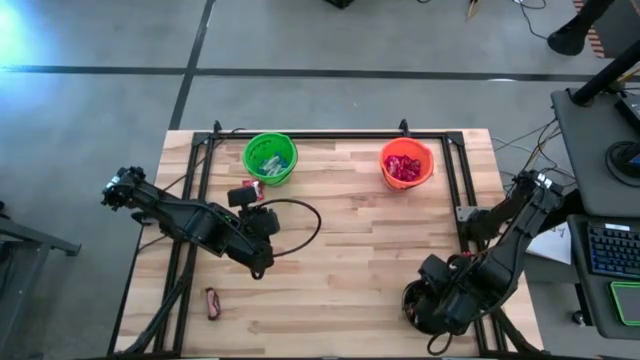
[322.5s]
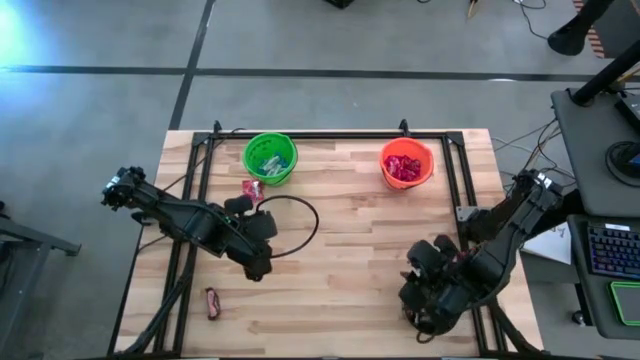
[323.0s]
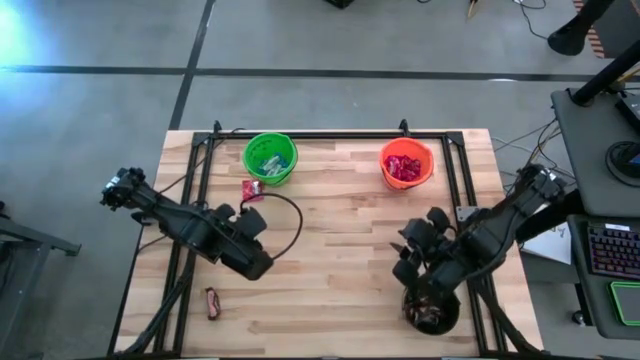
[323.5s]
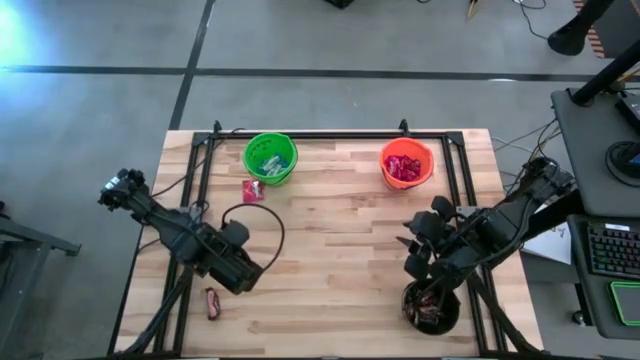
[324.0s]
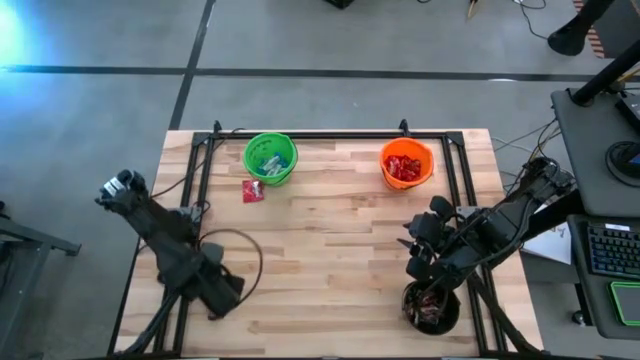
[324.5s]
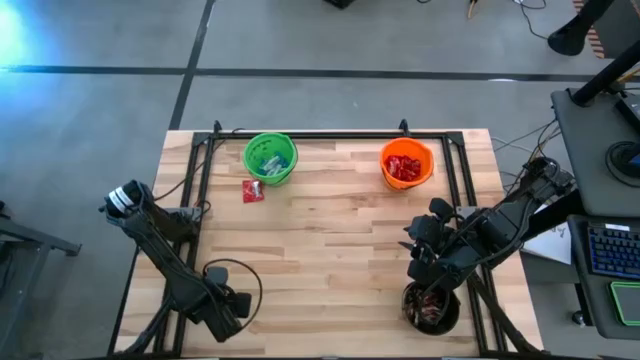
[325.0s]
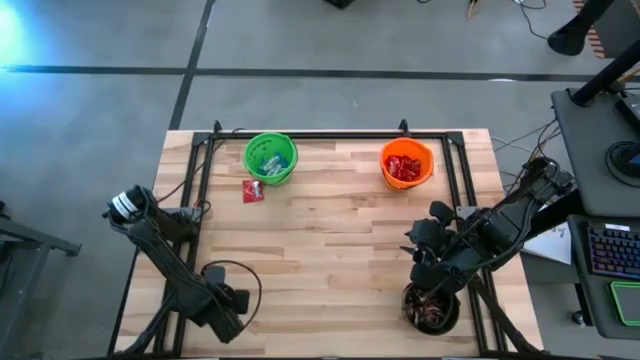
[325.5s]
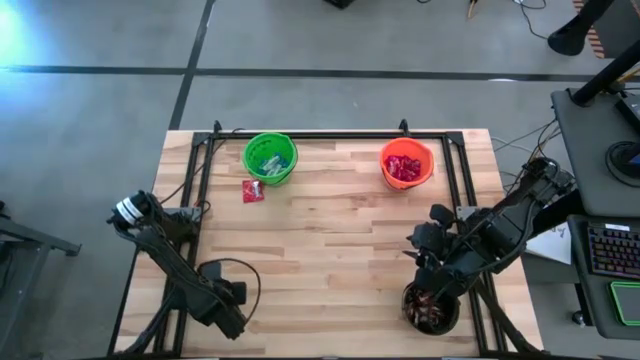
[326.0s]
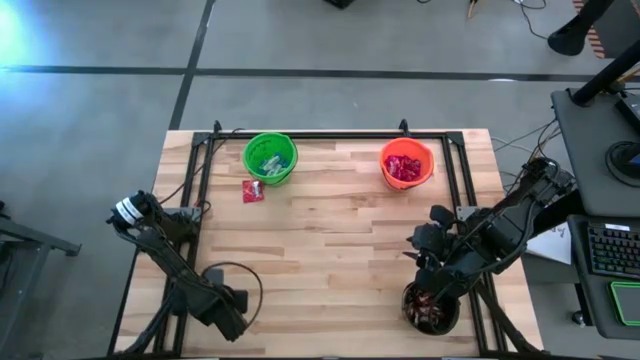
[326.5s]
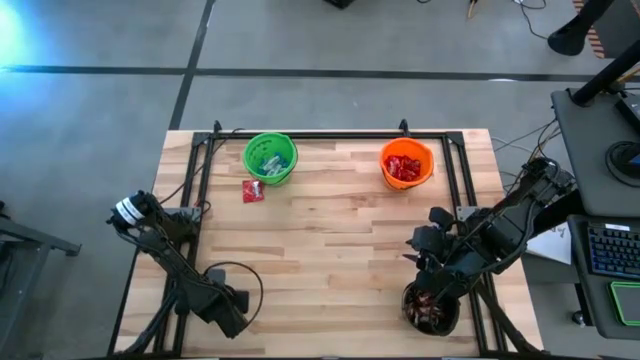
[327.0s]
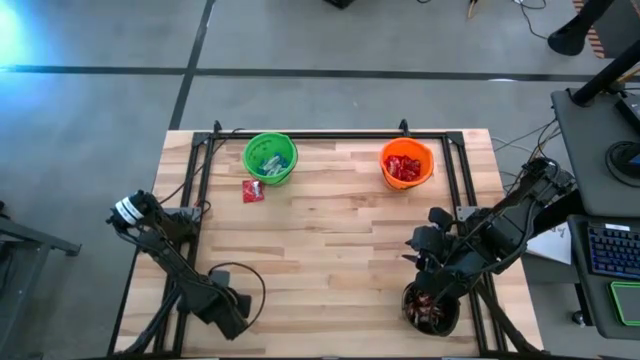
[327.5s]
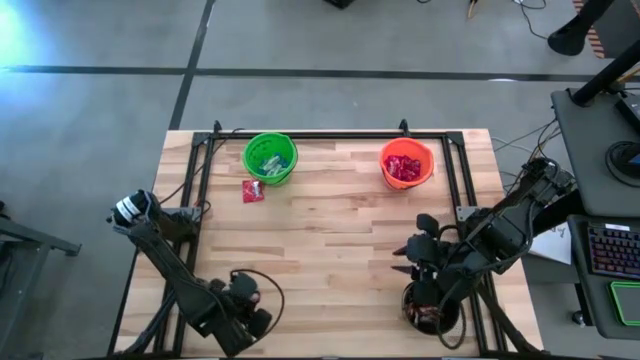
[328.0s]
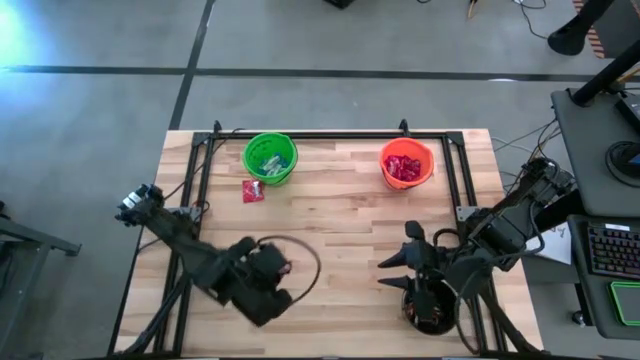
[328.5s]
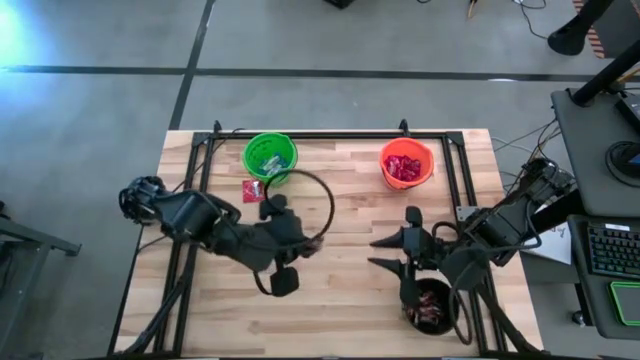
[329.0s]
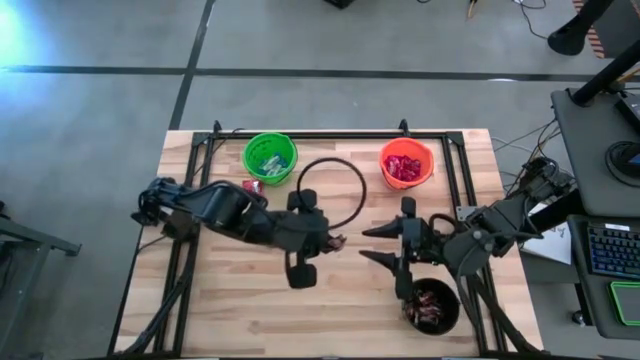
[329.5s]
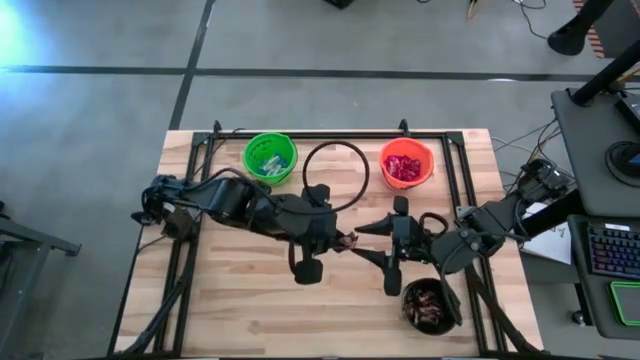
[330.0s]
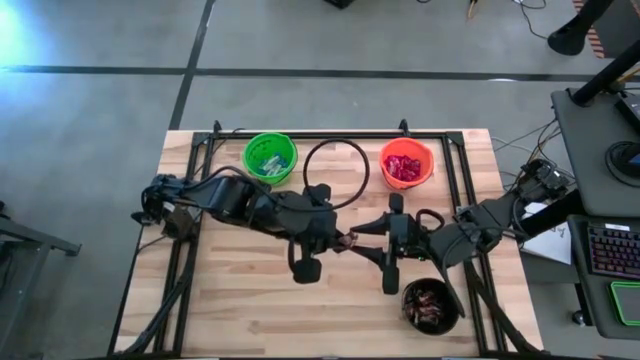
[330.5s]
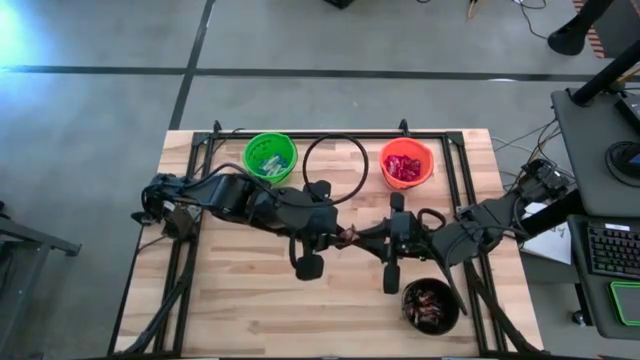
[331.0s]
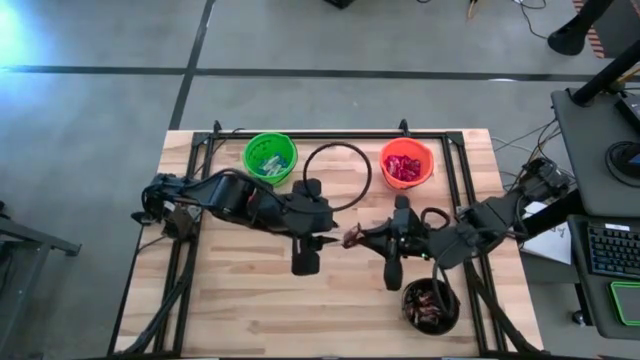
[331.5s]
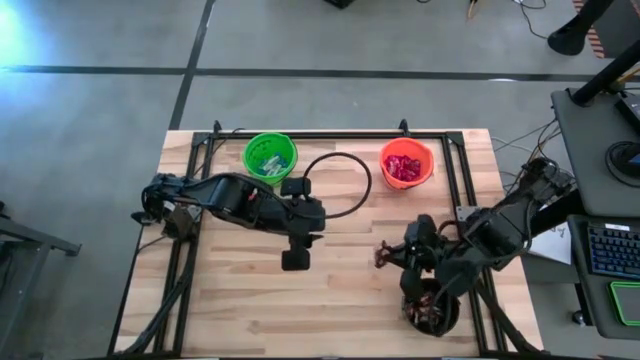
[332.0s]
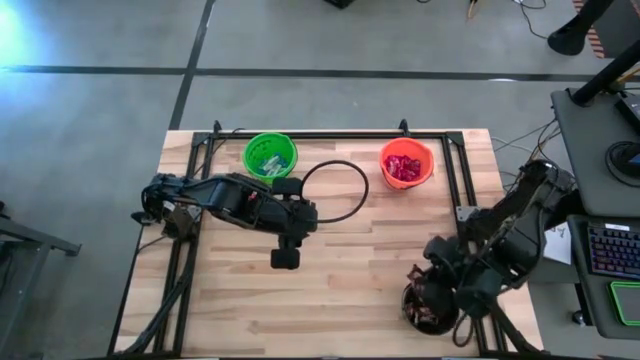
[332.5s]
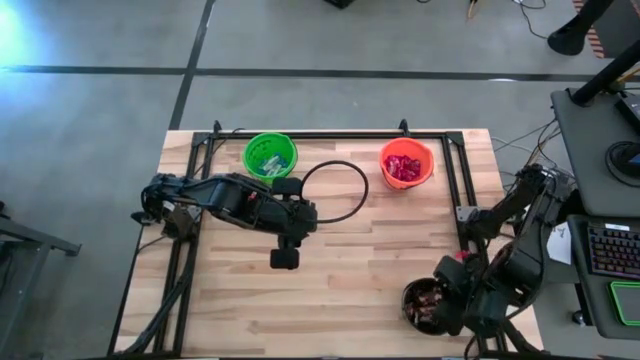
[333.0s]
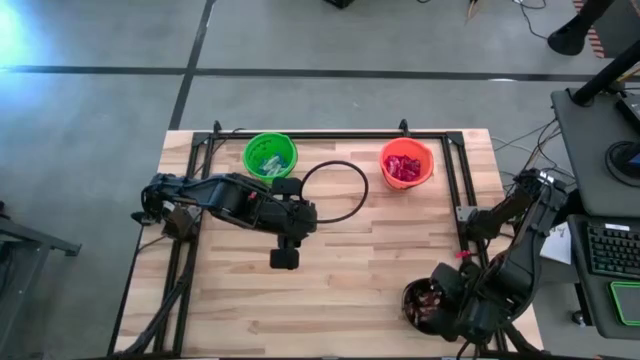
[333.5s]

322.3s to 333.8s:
Task: Sort candy
Put the brown candy into the black bucket

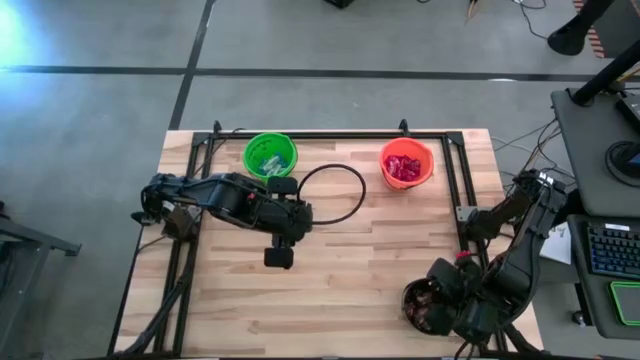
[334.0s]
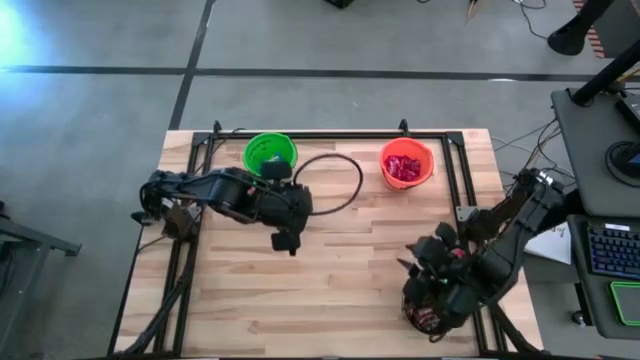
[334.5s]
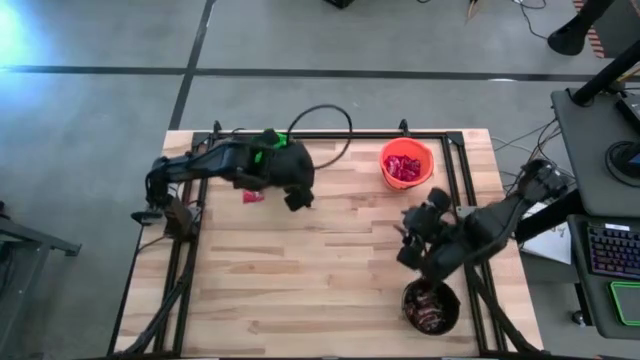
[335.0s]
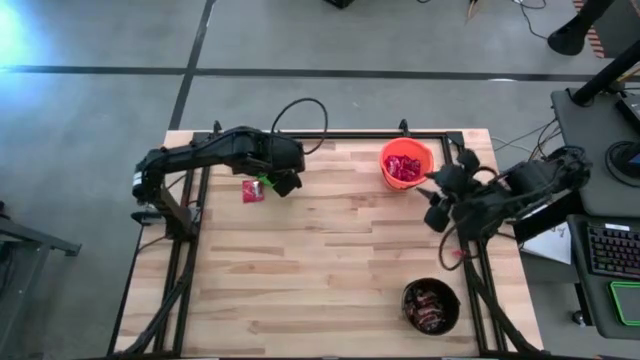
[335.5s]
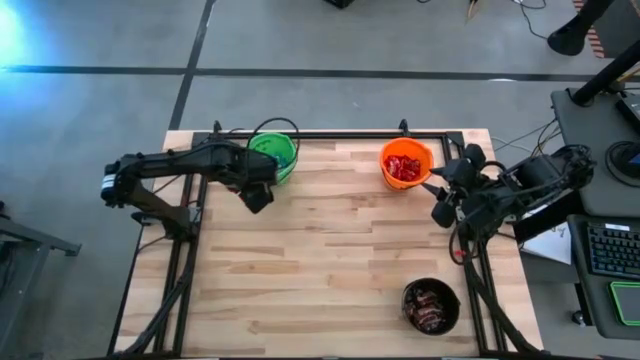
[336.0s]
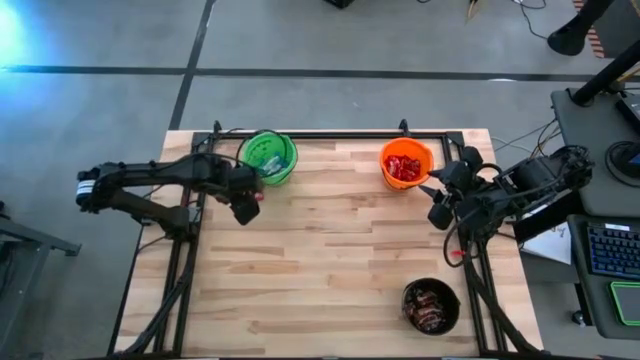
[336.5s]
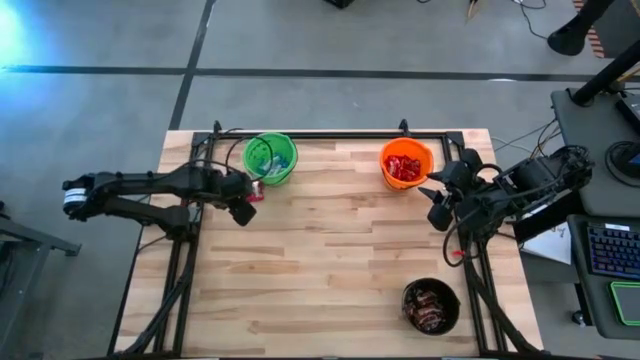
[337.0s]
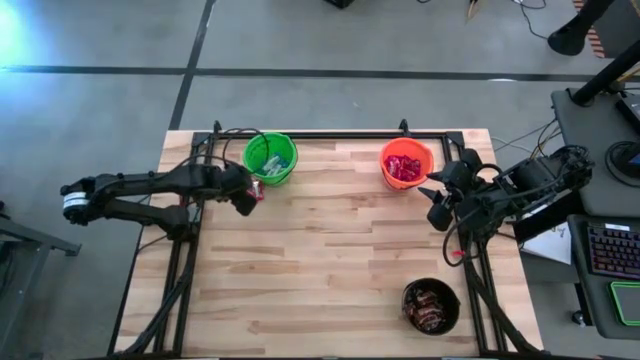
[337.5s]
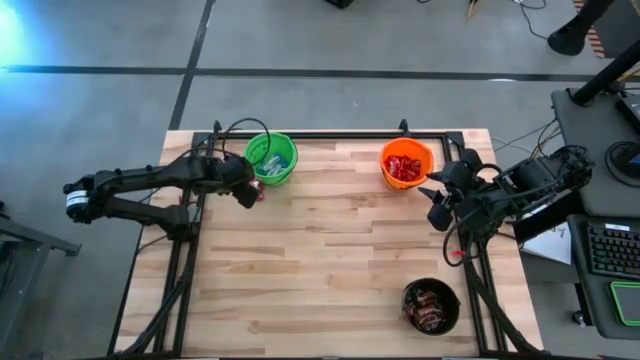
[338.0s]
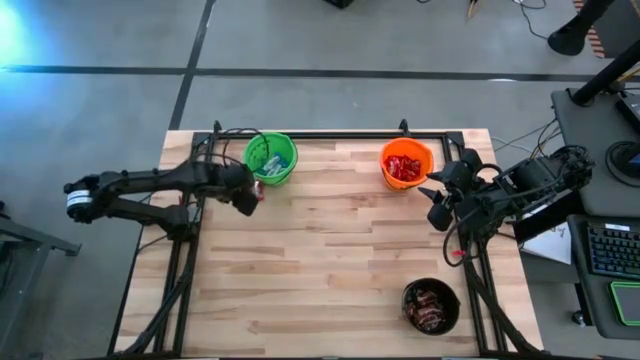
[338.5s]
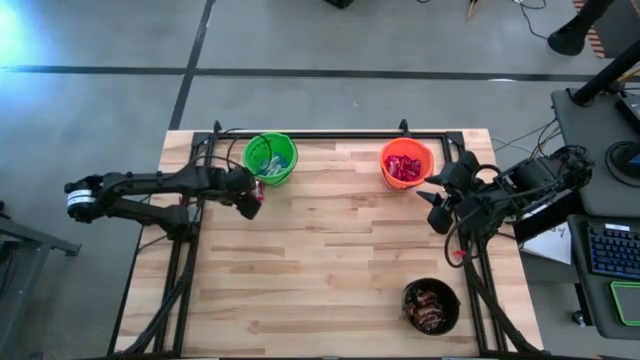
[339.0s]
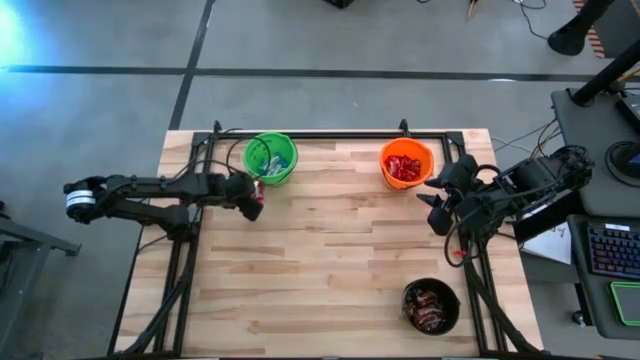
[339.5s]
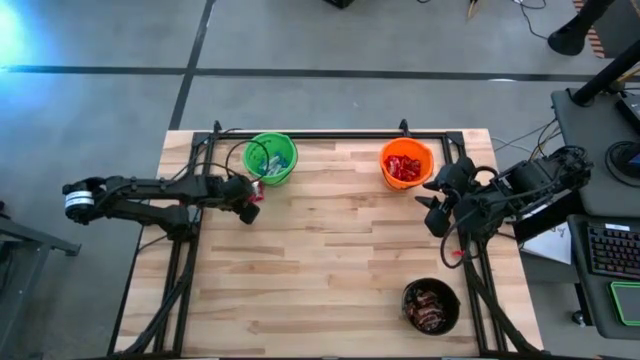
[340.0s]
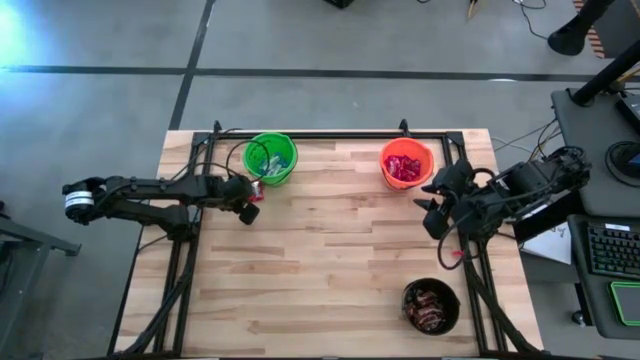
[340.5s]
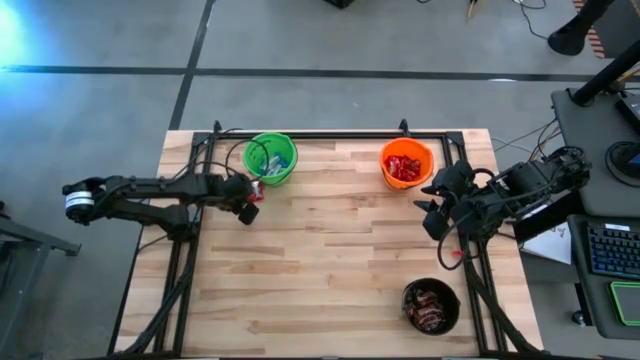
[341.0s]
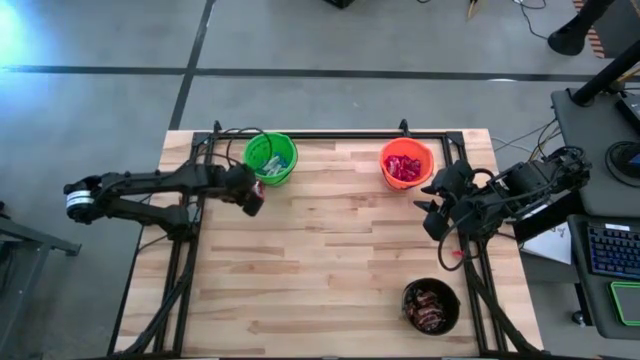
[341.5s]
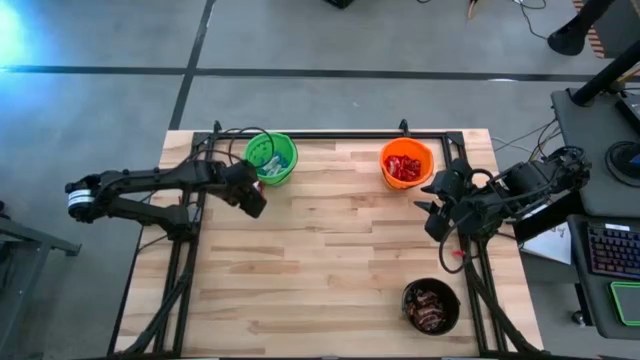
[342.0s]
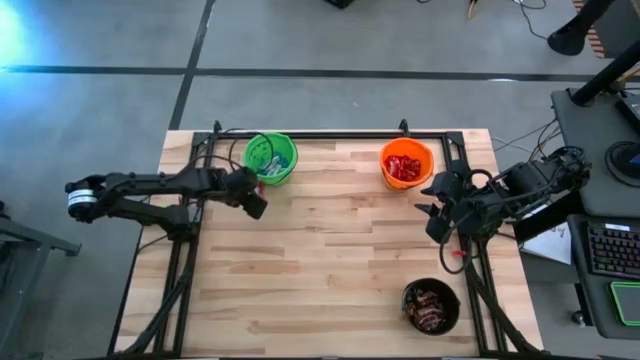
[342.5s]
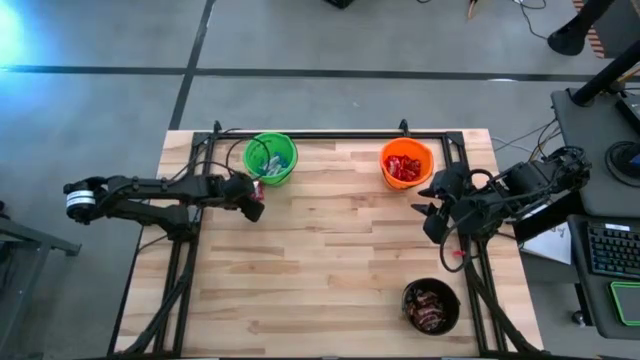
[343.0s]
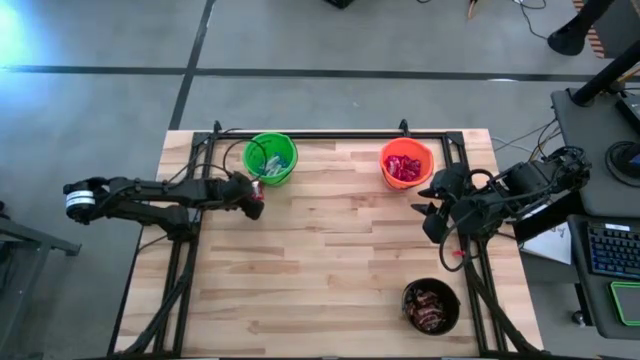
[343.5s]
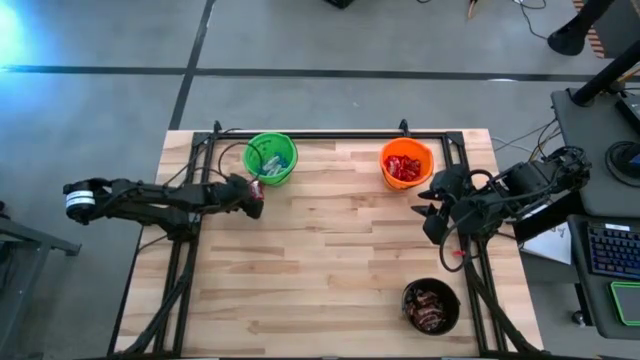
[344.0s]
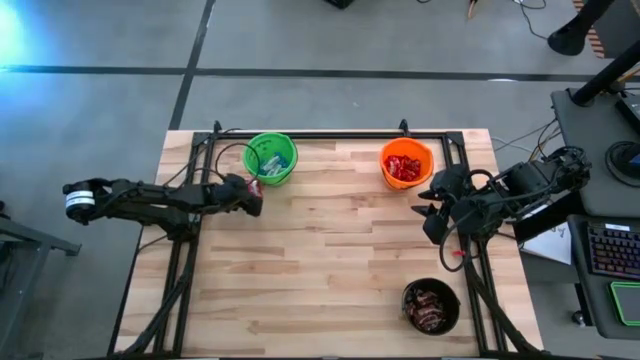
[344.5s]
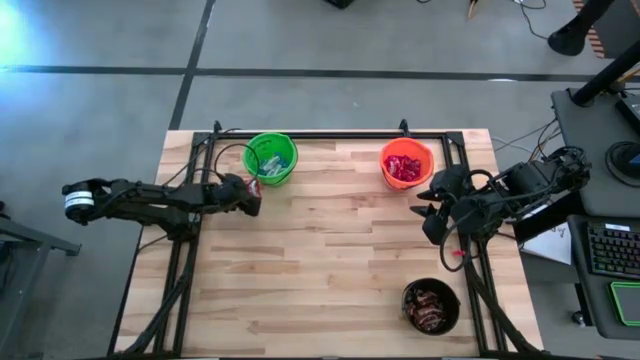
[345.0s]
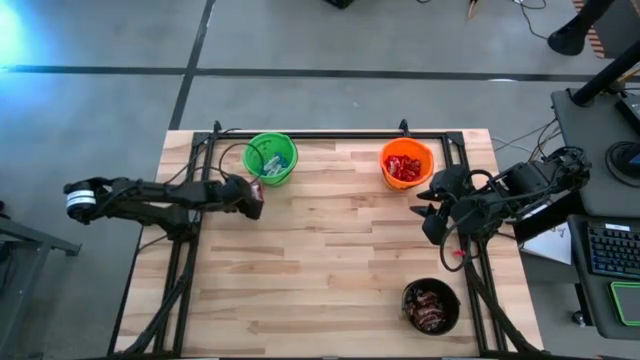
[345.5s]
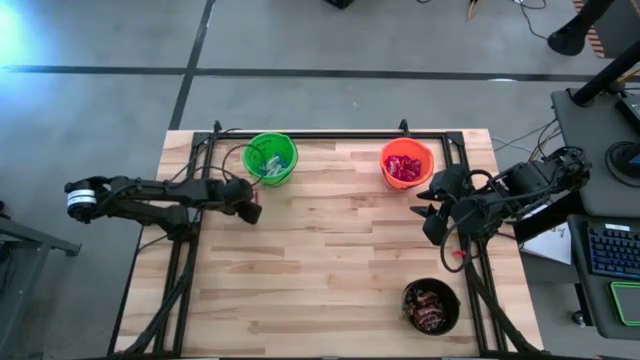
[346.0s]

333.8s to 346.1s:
Put the red candy into the orange bucket
